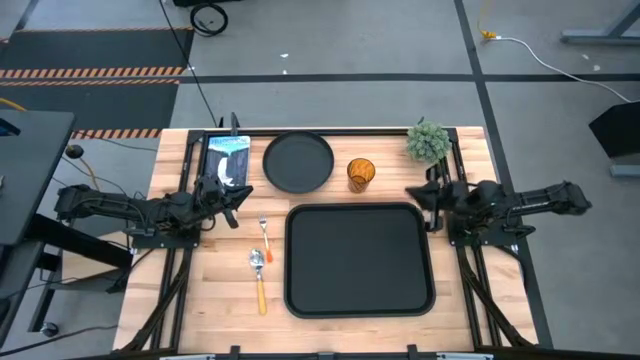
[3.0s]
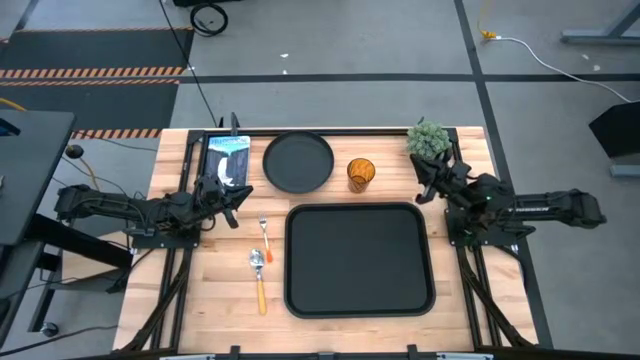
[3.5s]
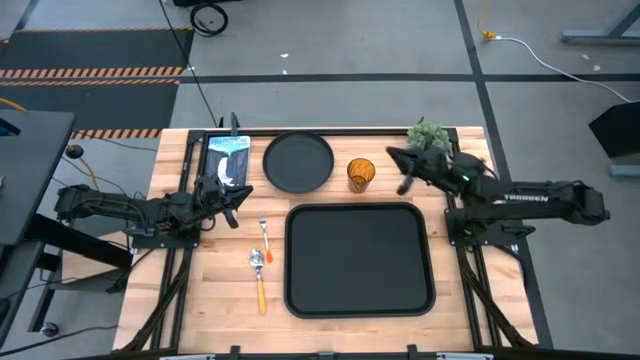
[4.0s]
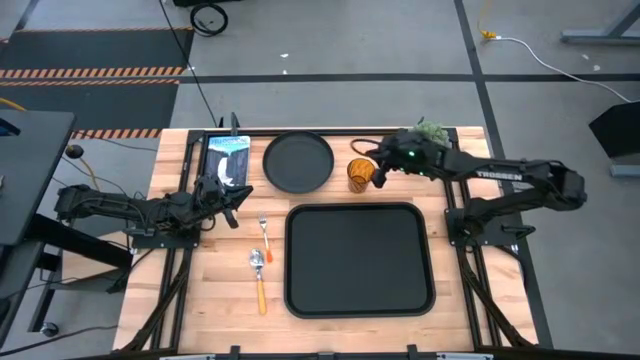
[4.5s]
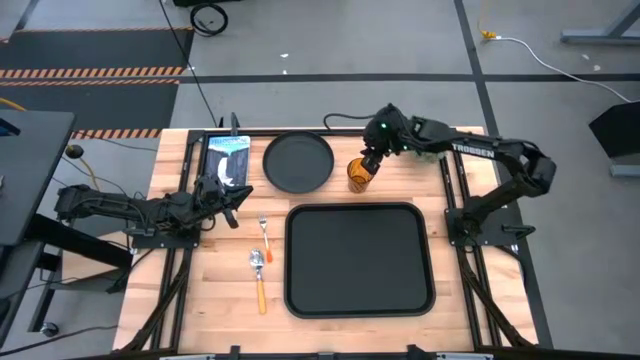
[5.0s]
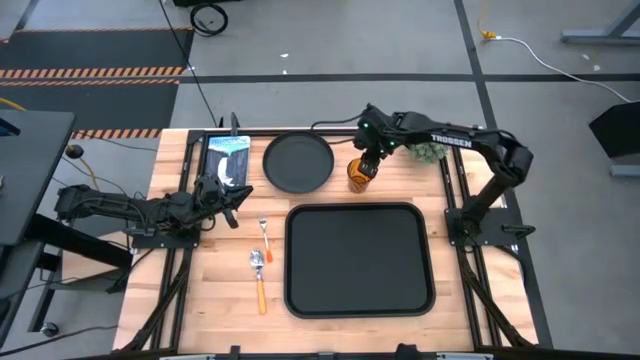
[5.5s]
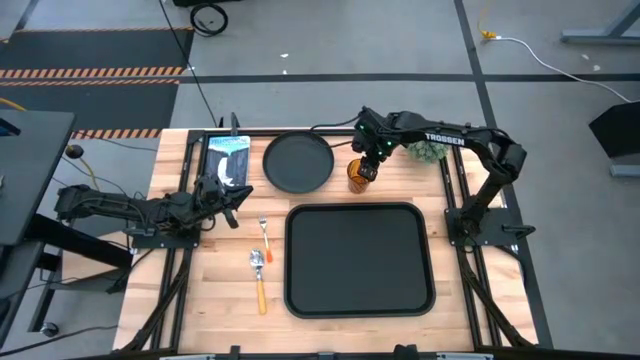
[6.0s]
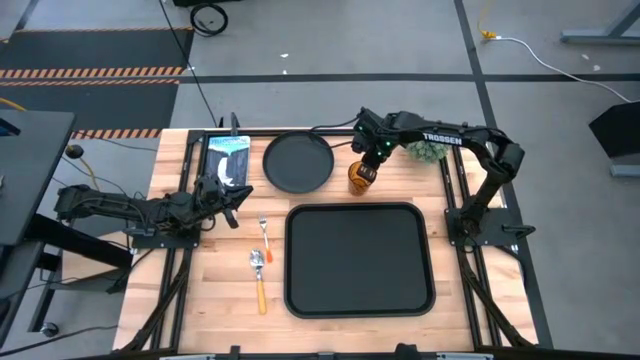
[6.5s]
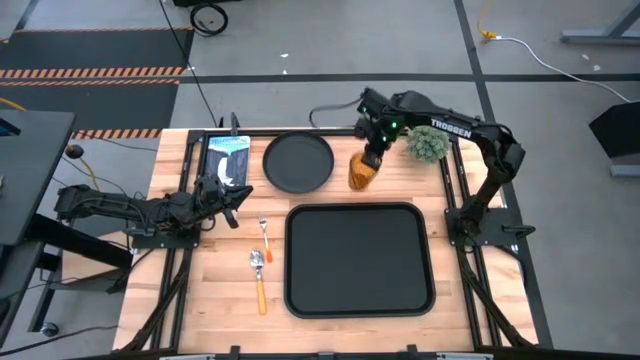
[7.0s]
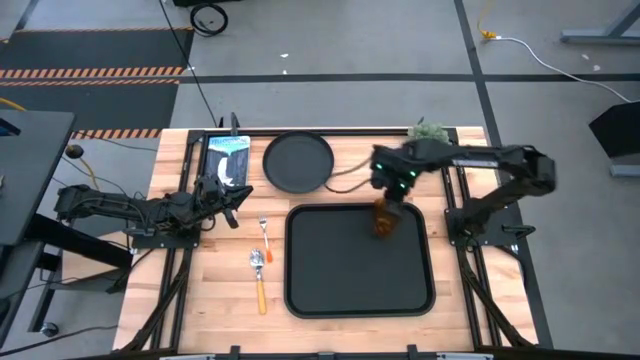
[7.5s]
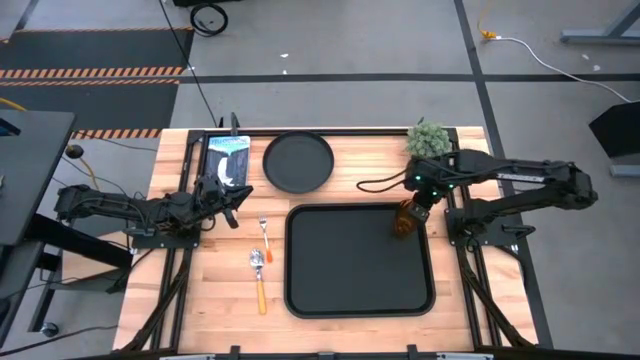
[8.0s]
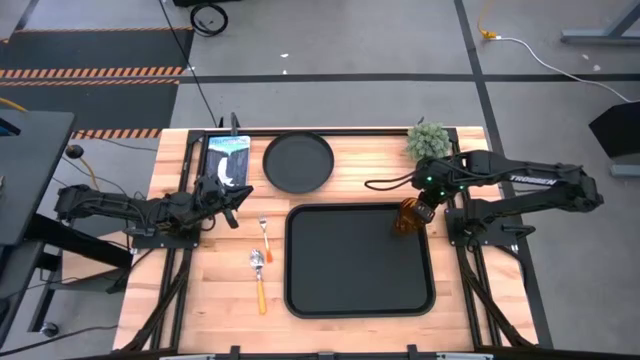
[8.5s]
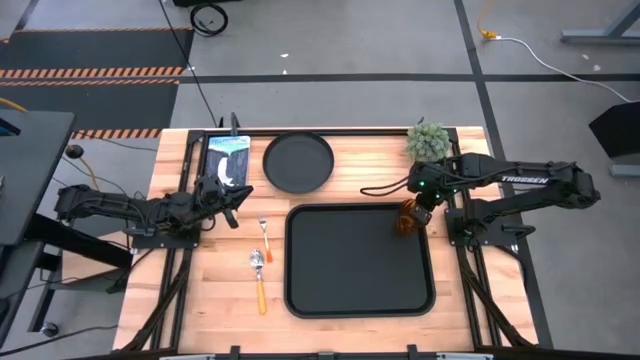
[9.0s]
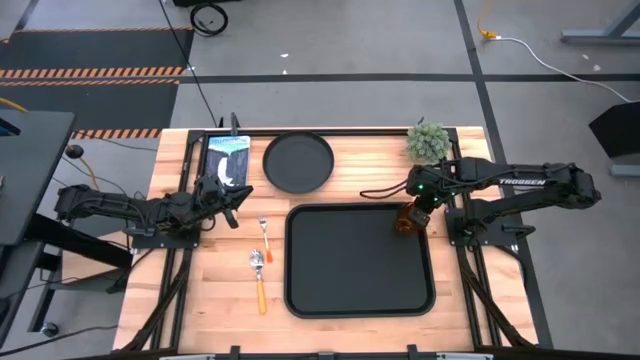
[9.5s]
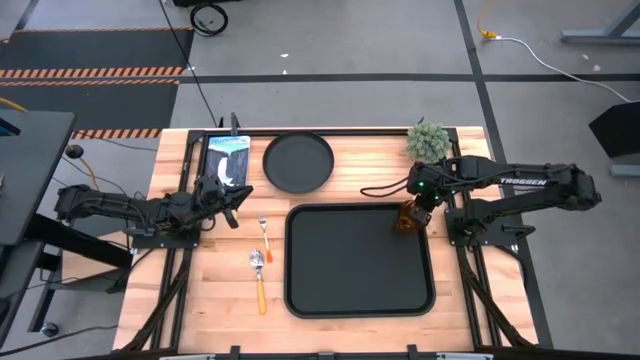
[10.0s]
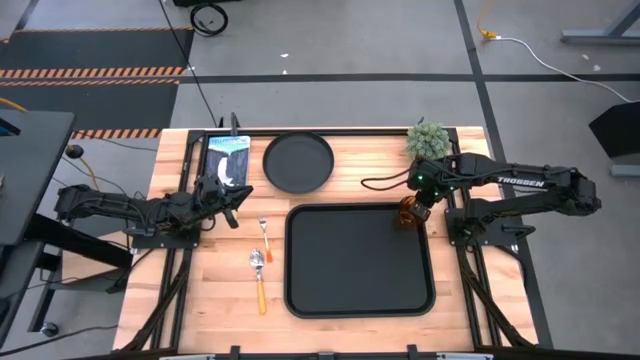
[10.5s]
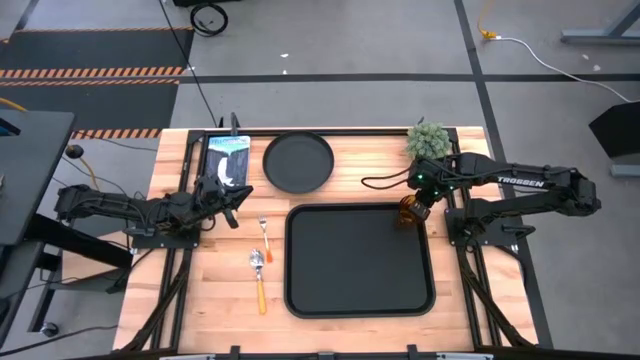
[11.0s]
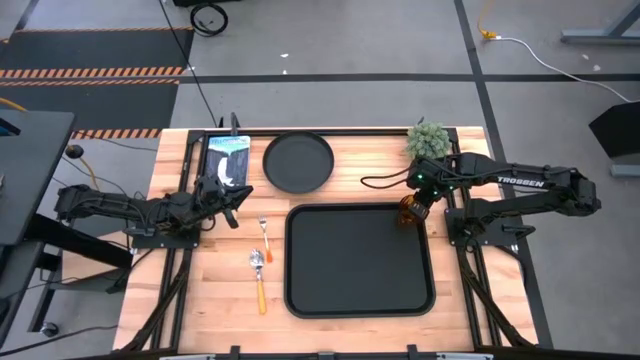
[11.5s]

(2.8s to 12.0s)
Task: Pick and place plate/cup/fork/spoon on tray
Put the brown cup to the top right on the black tray

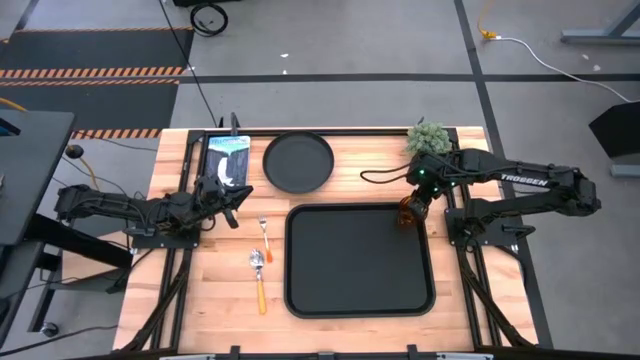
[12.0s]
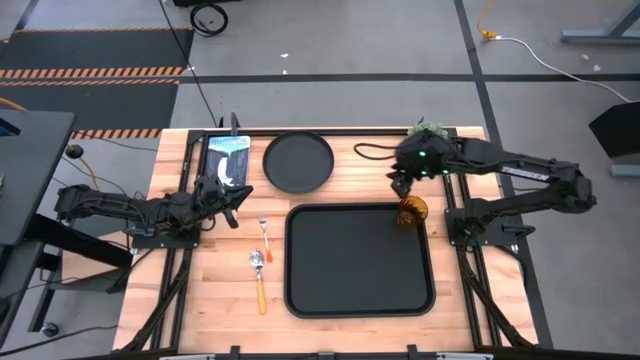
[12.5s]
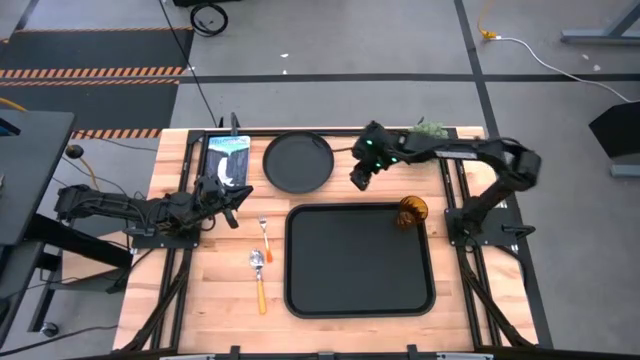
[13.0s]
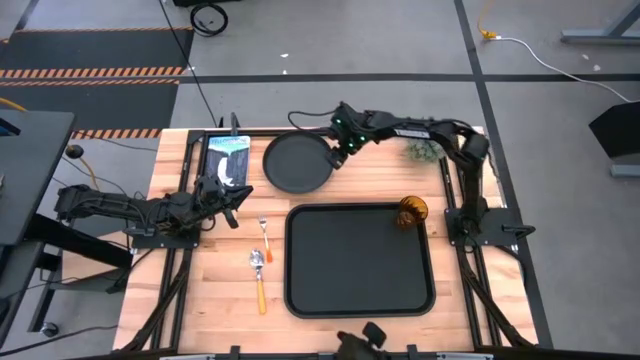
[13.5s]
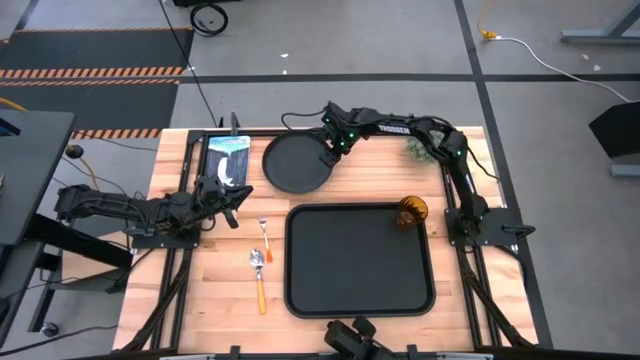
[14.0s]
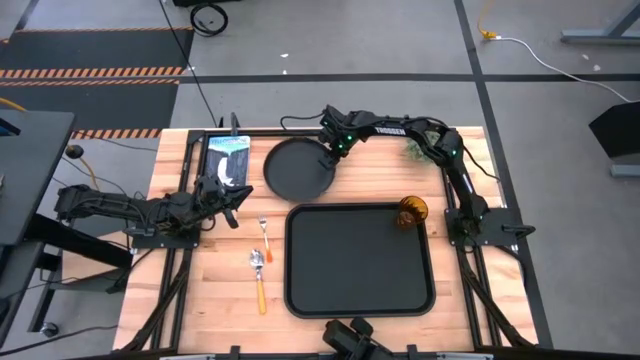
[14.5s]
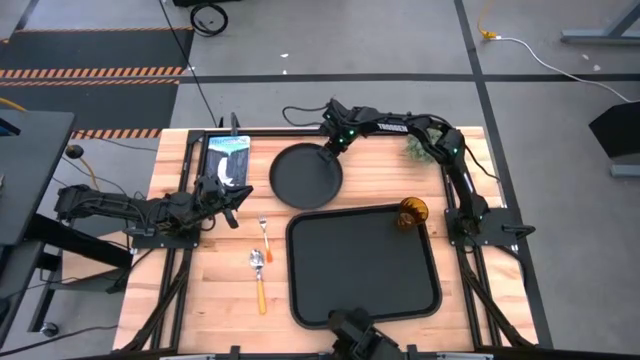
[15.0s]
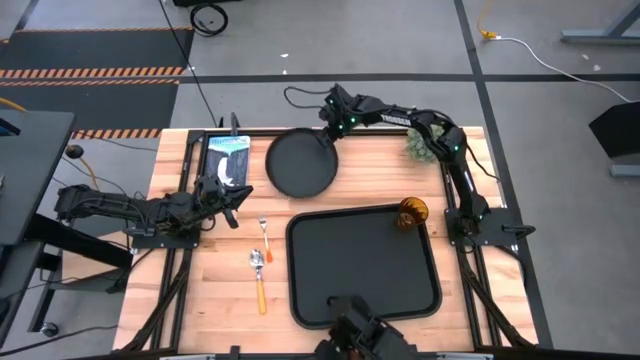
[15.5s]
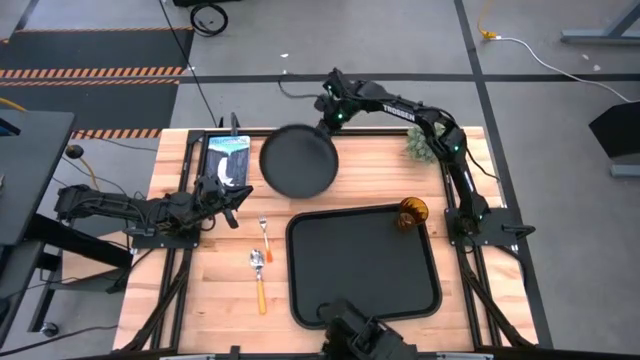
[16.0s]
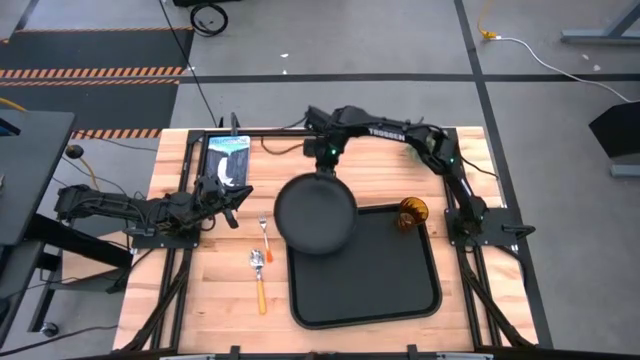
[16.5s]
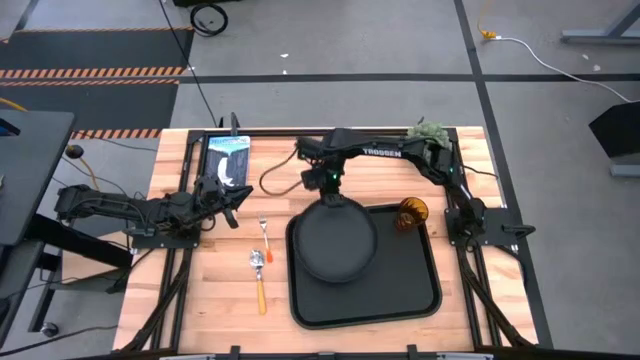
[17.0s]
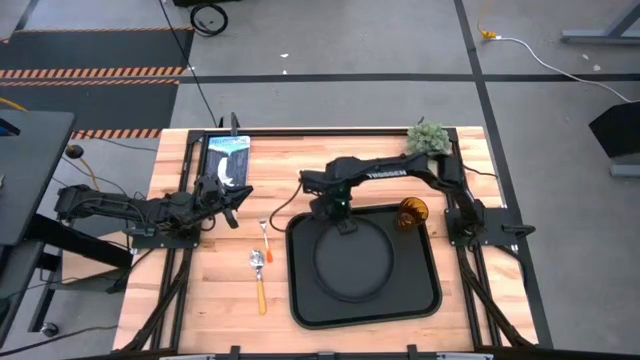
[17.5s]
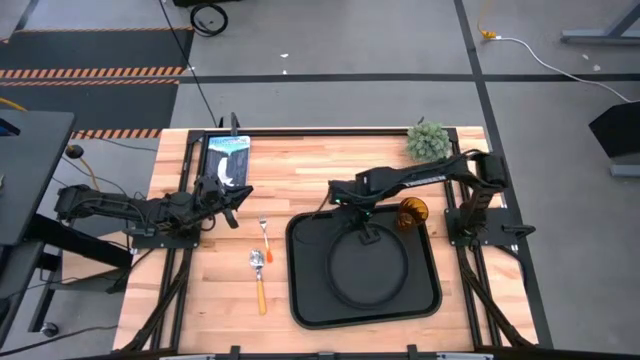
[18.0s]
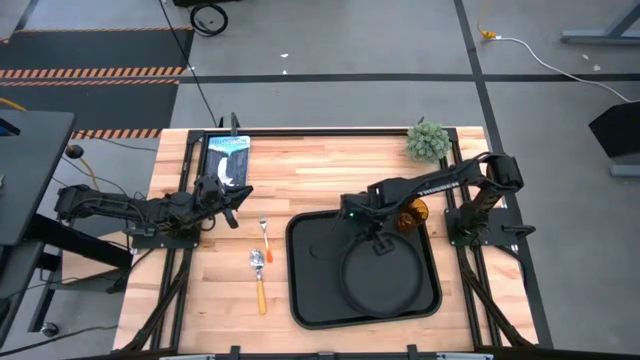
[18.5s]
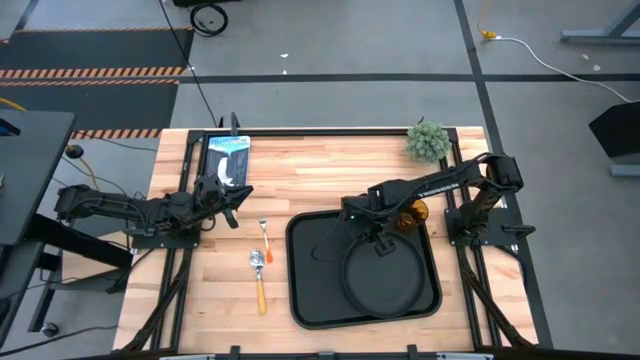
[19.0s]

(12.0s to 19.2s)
Put the black plate on the black tray

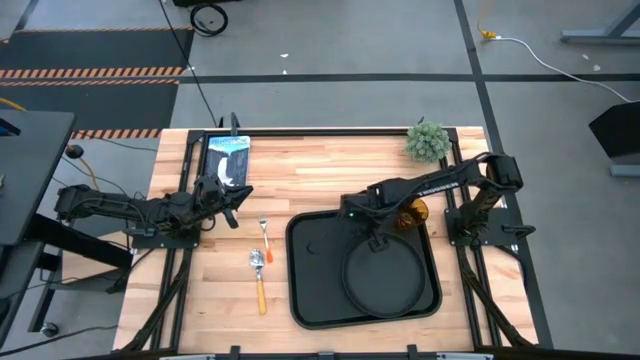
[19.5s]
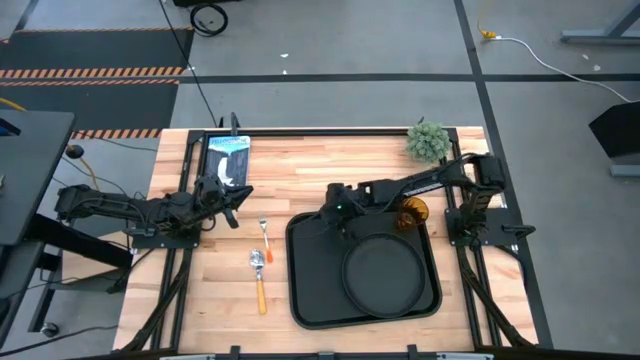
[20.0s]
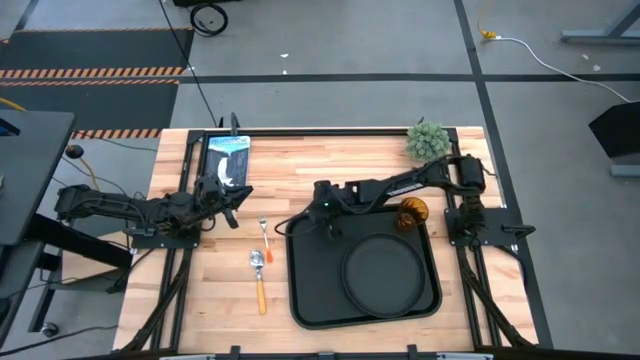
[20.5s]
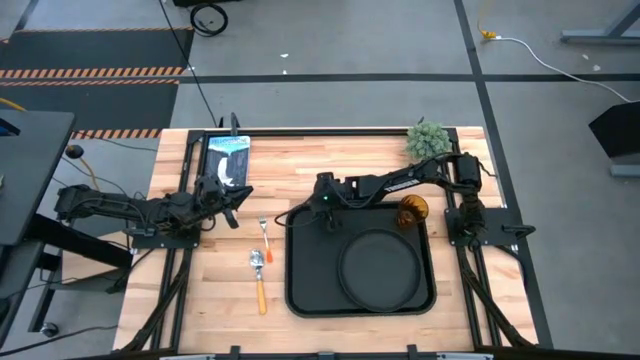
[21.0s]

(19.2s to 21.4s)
Adjust the black tray

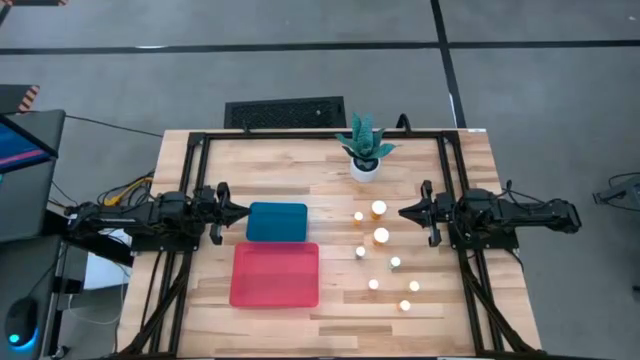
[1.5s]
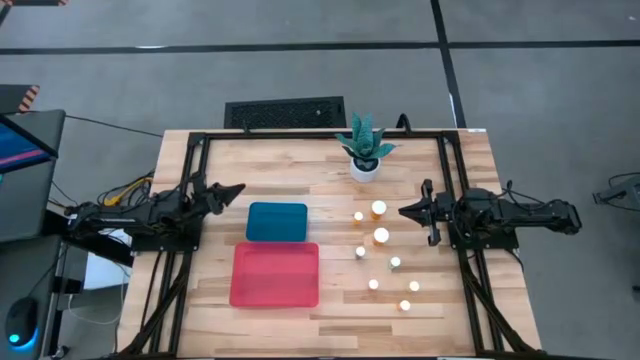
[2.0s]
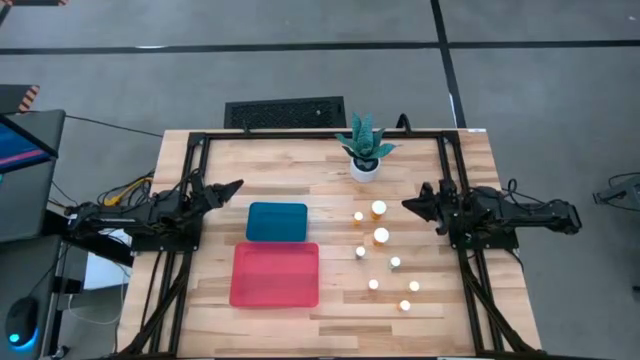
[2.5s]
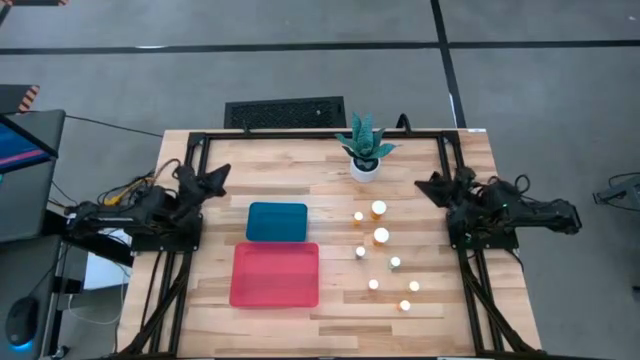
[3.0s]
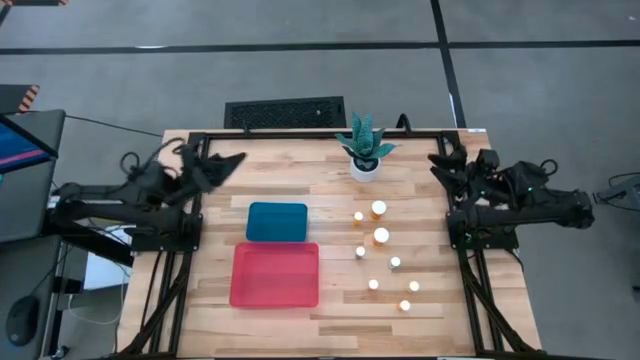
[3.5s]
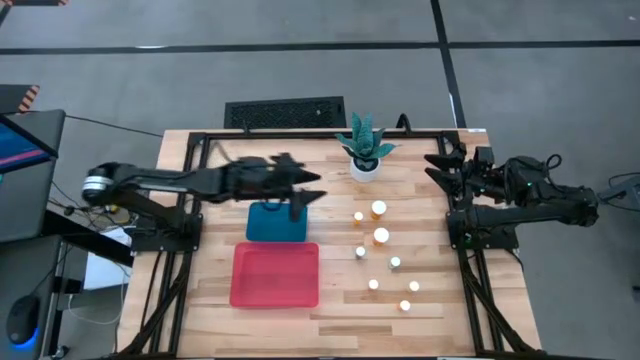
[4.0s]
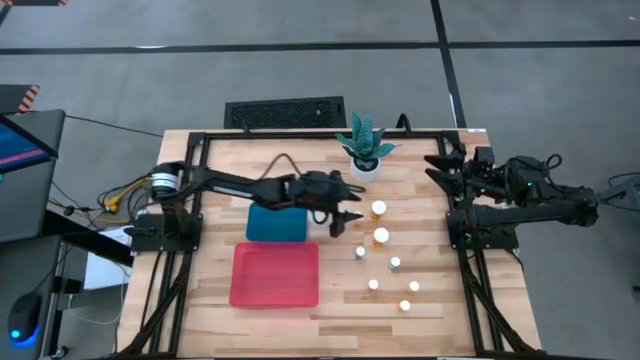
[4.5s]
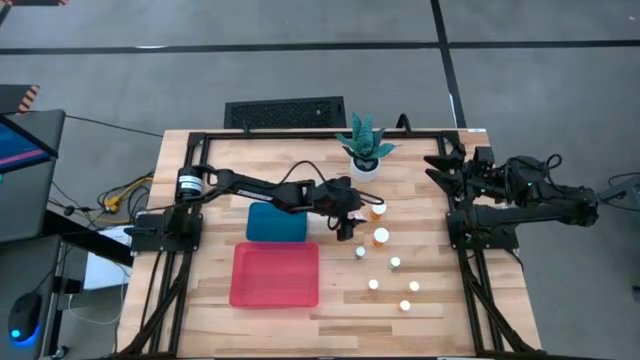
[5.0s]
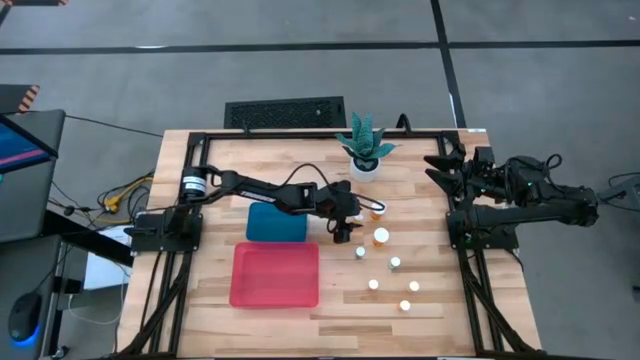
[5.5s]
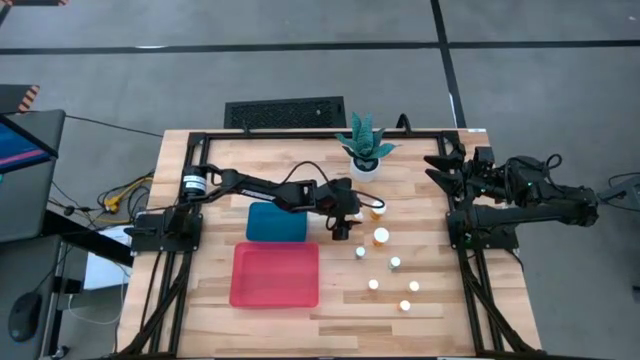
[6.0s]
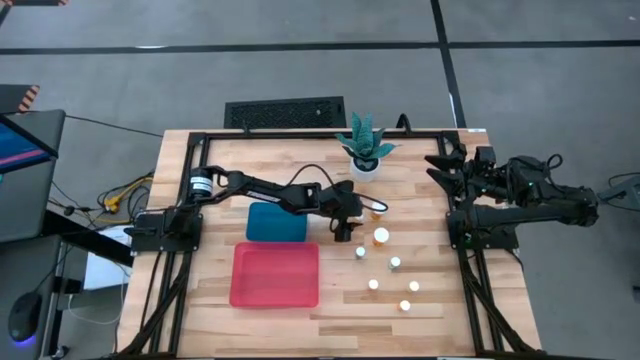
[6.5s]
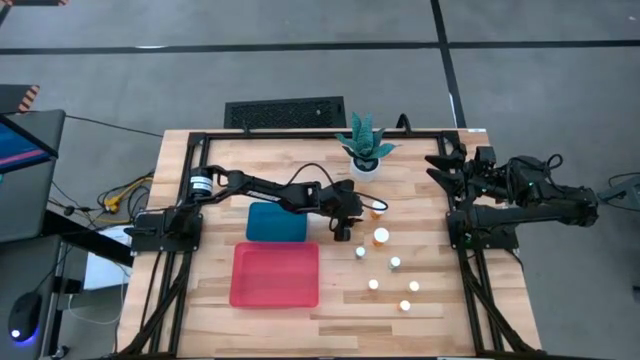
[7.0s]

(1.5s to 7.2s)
Task: Pick and place medicine bottles into bin by pill shape (circle, oval)
Put the orange tablet bottle into the blue bin
